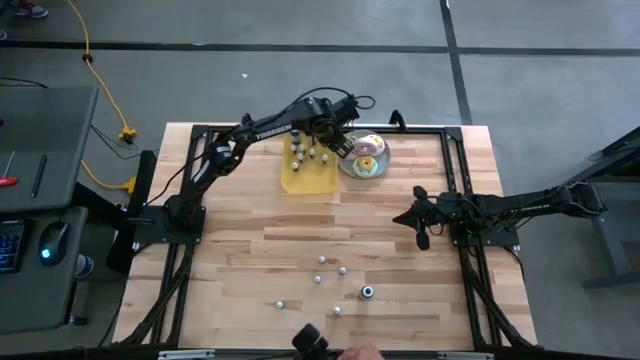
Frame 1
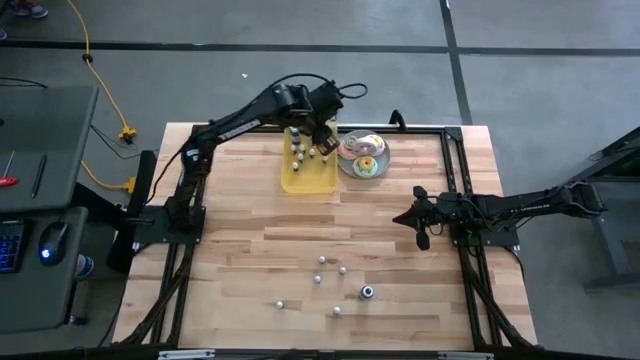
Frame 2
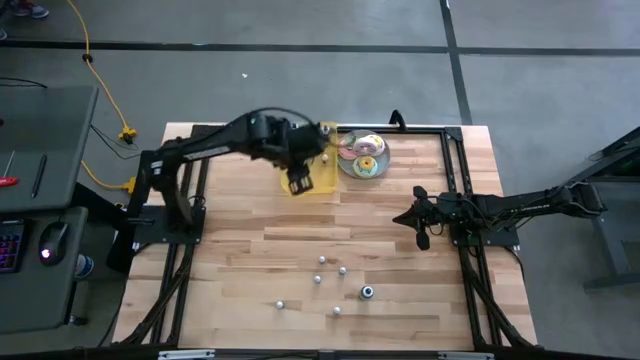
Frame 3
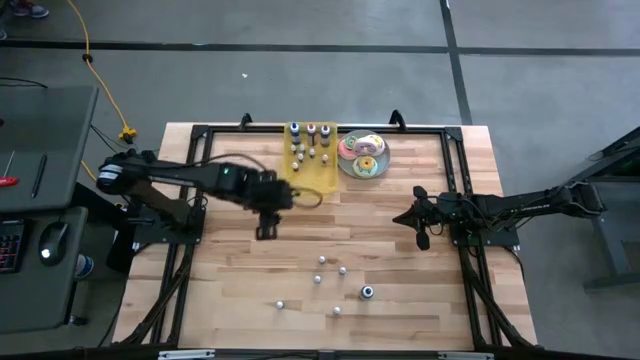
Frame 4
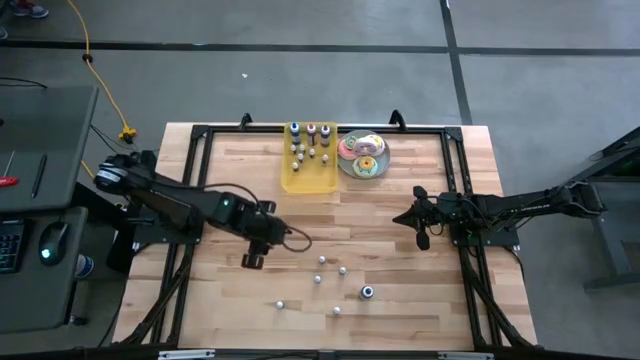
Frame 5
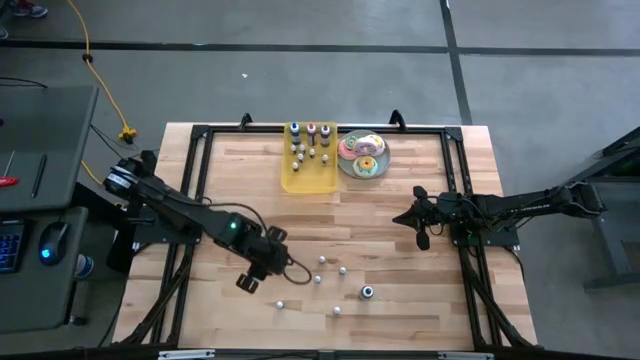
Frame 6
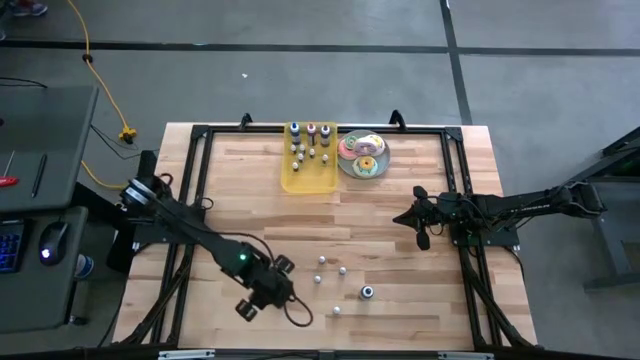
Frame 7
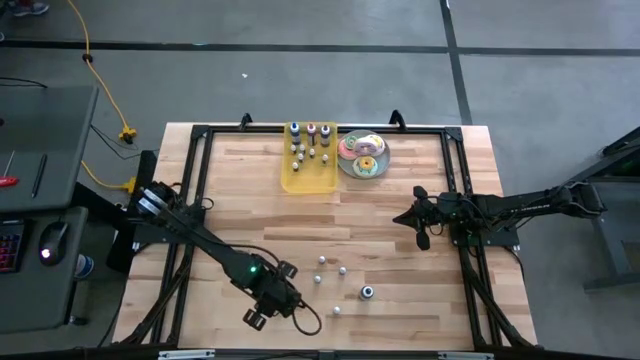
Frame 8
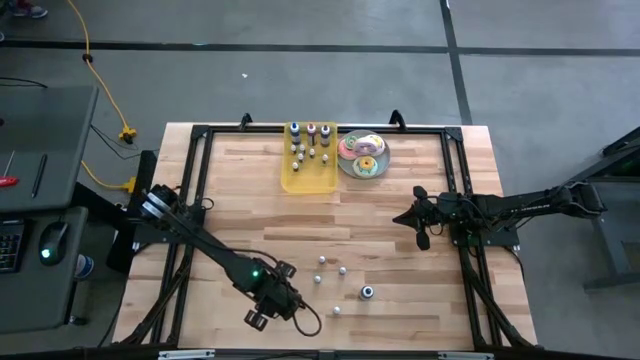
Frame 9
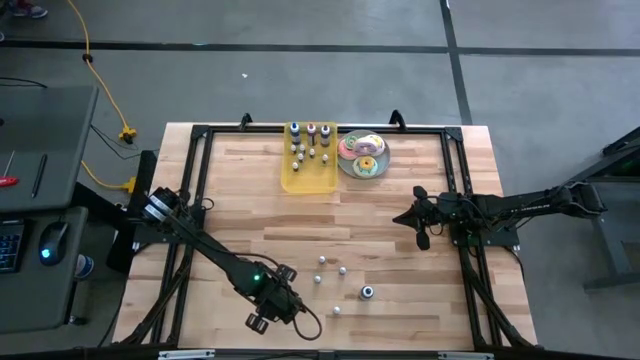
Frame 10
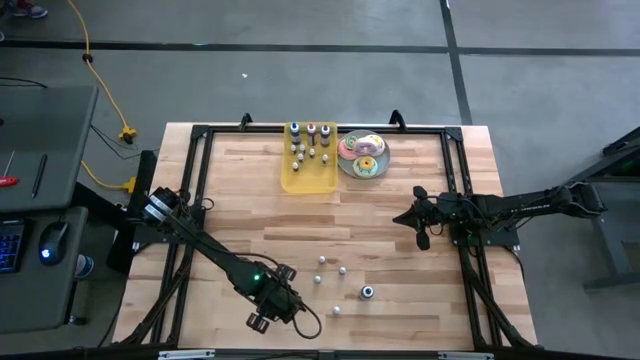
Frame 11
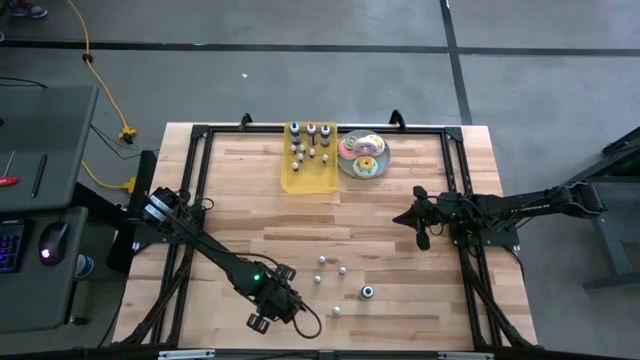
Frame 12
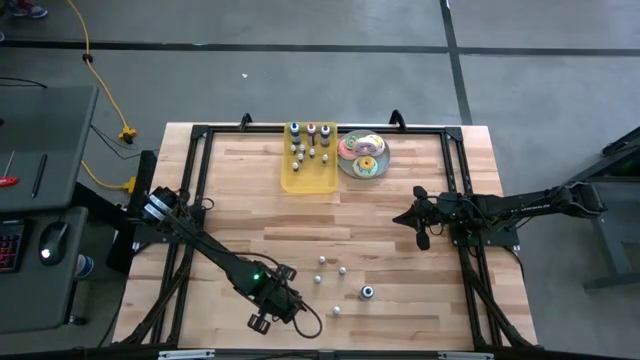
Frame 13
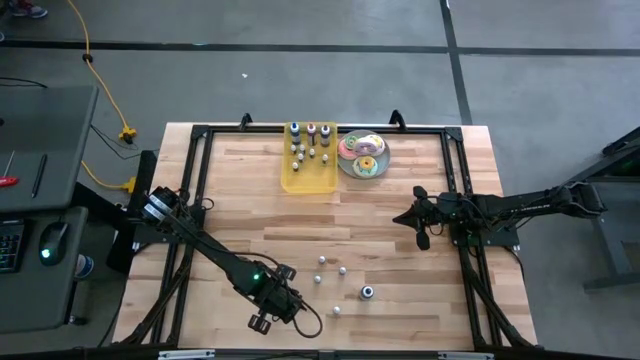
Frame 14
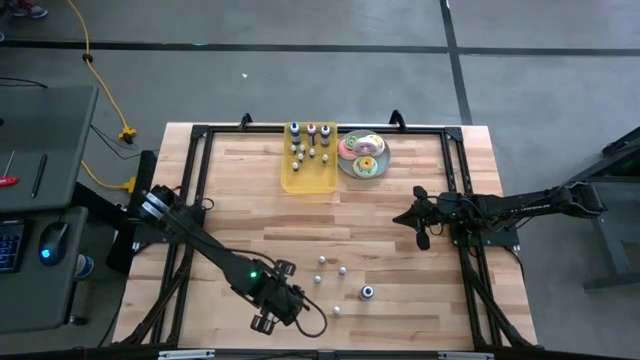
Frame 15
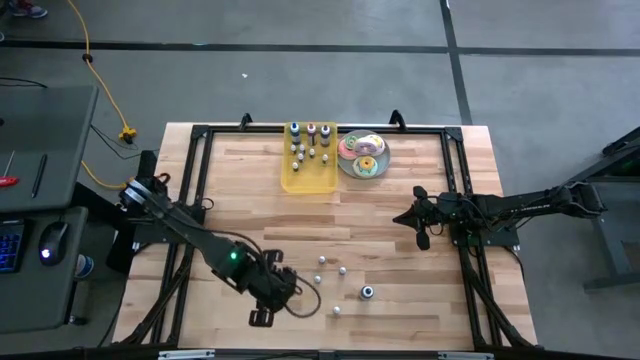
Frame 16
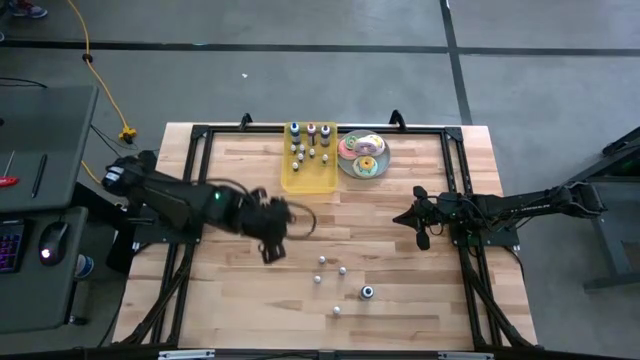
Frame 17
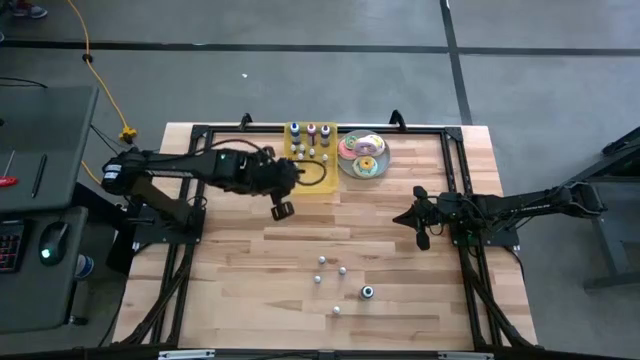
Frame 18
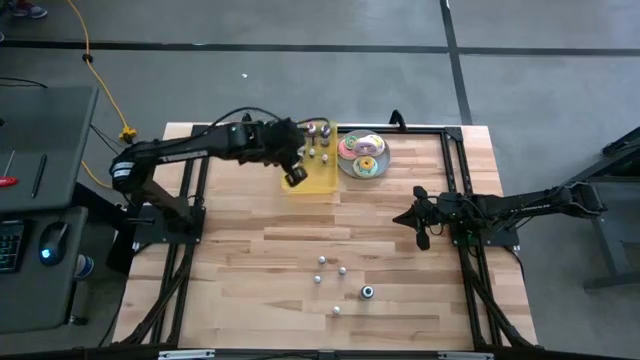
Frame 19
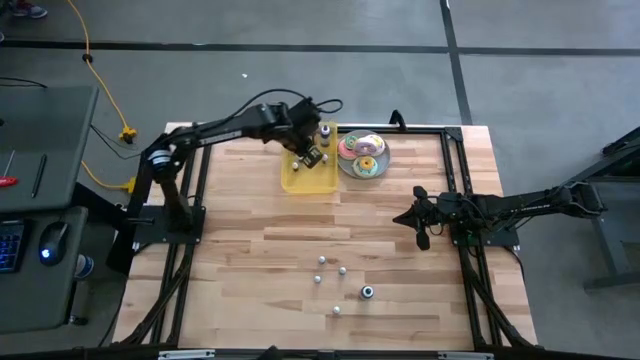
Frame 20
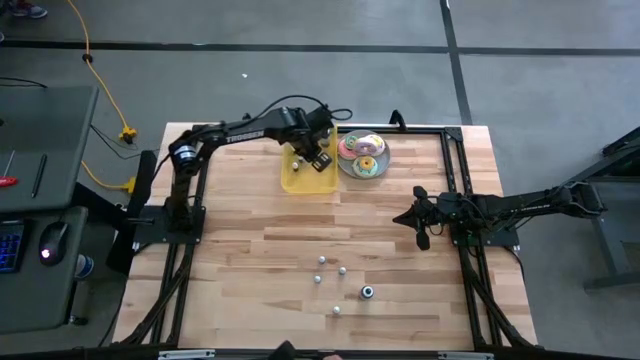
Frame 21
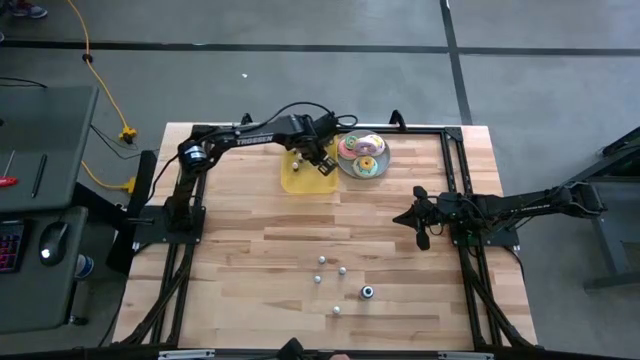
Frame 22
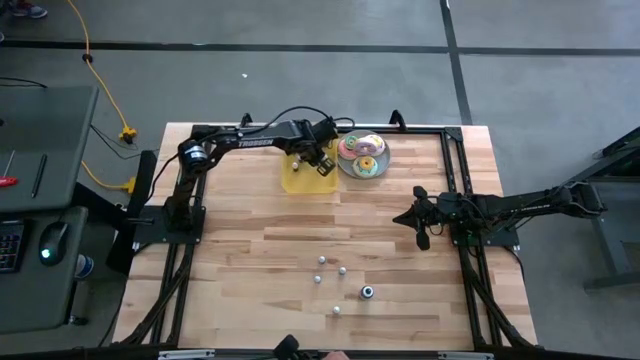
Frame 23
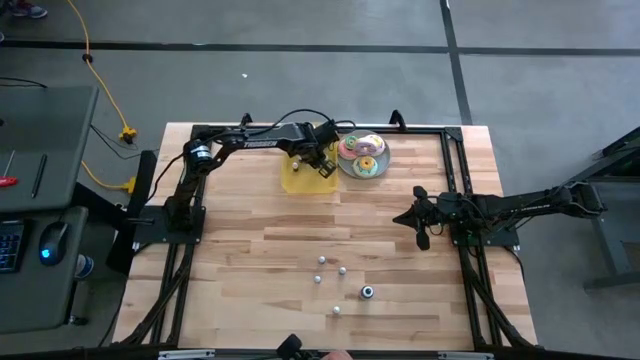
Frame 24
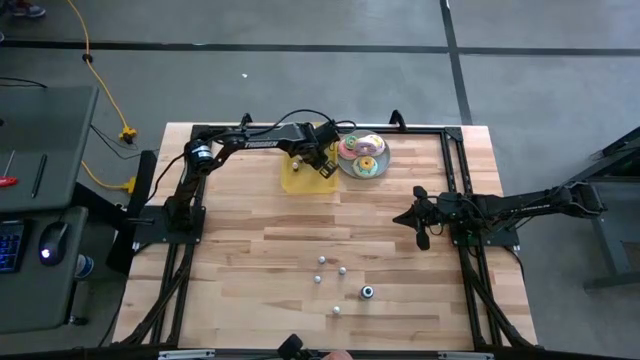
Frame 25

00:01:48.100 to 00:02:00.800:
Task: Pick & Place food coloring
Put the small black food coloring bottle into the bin

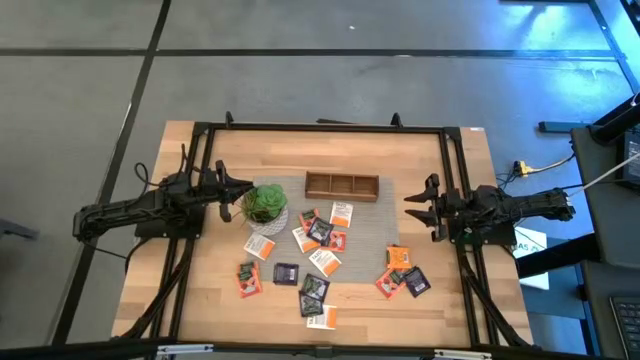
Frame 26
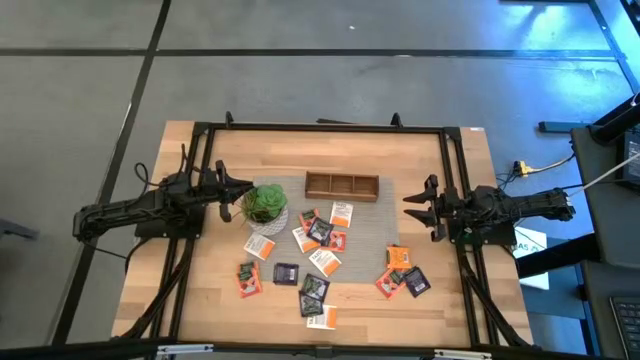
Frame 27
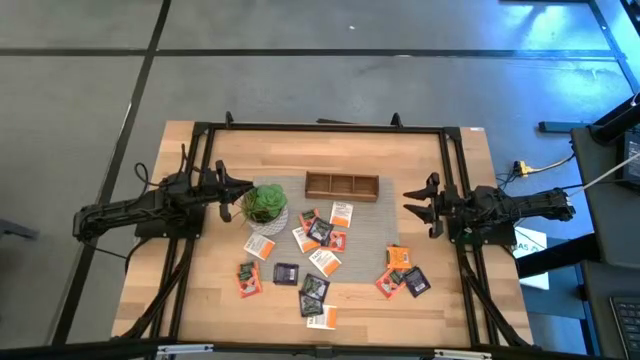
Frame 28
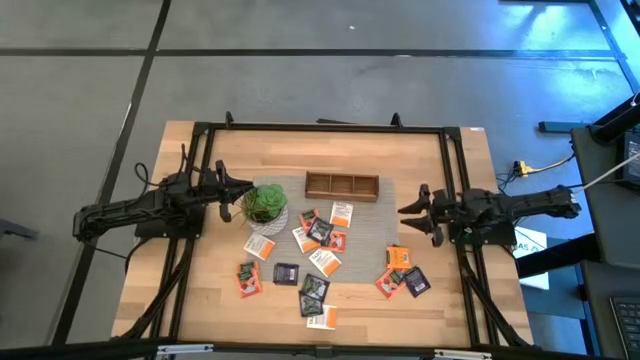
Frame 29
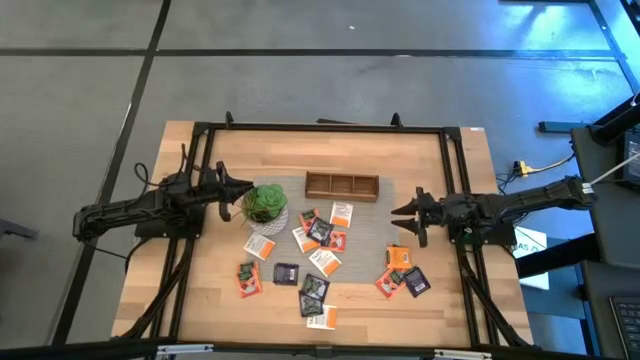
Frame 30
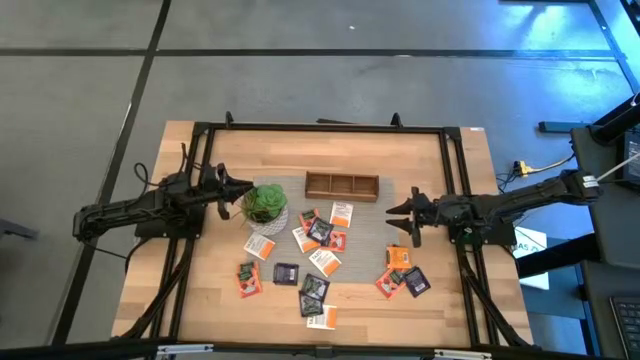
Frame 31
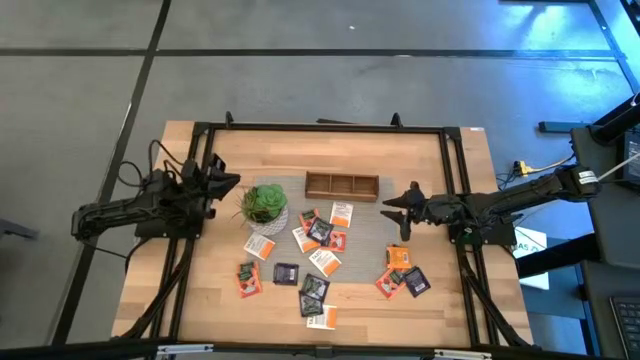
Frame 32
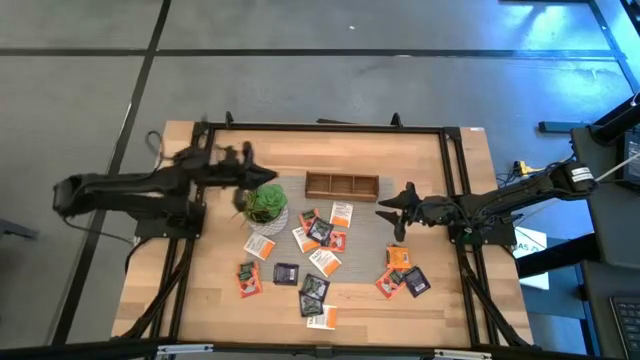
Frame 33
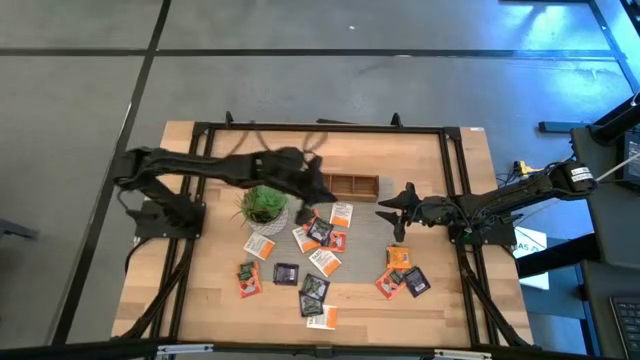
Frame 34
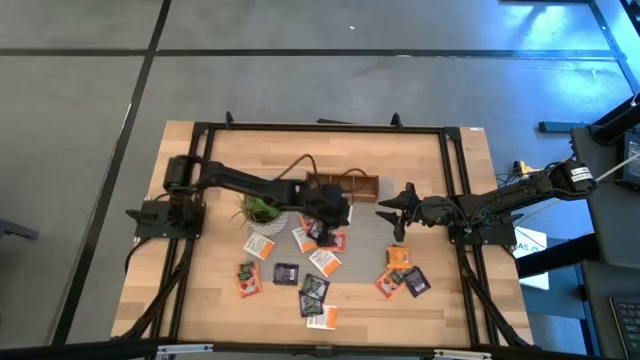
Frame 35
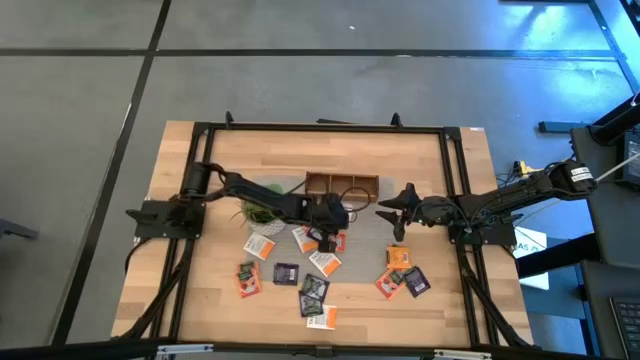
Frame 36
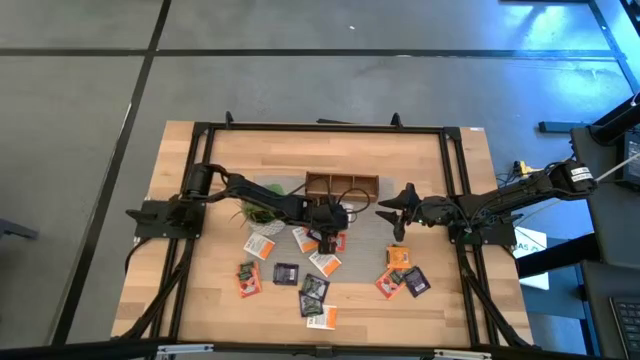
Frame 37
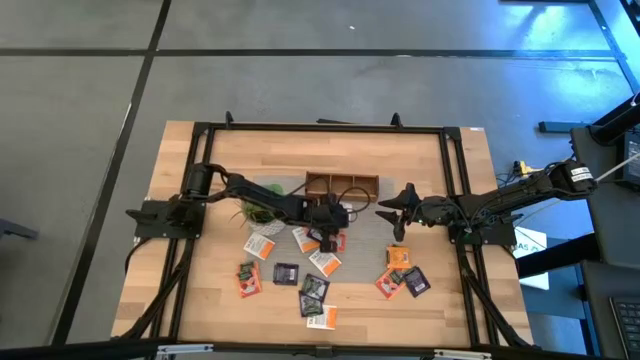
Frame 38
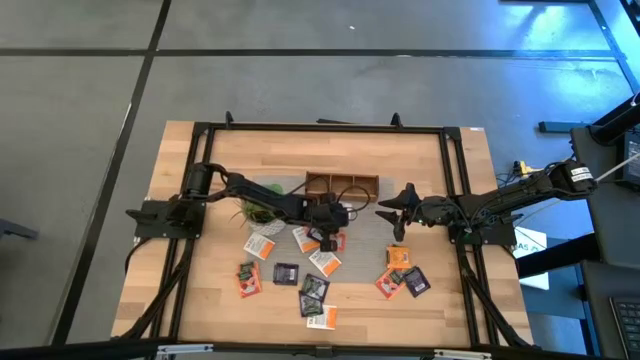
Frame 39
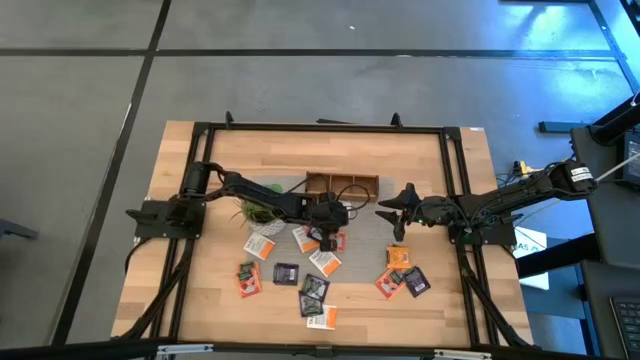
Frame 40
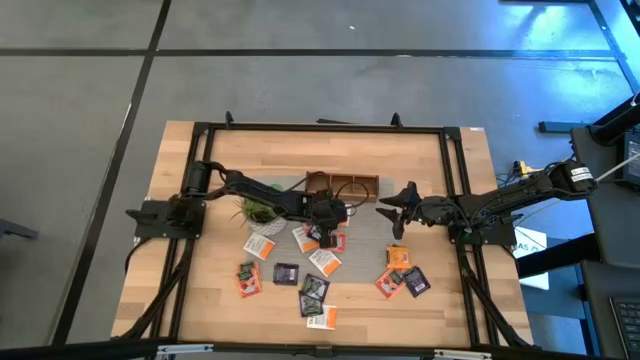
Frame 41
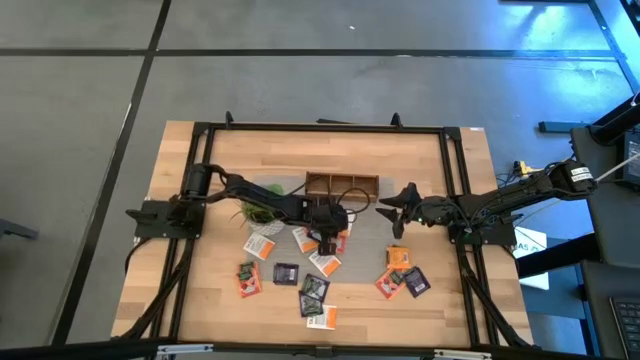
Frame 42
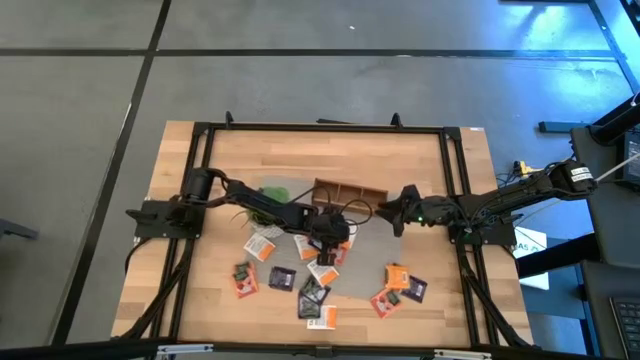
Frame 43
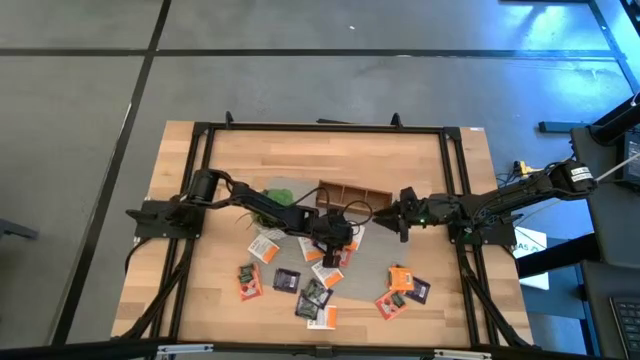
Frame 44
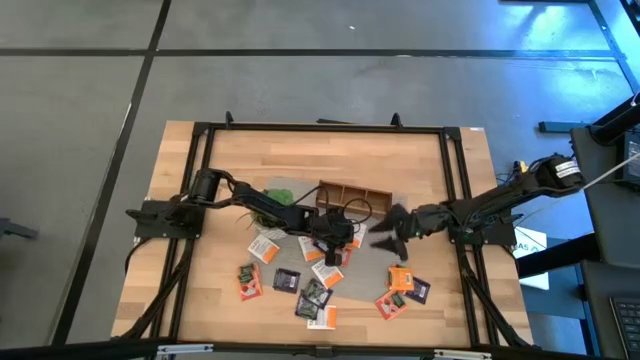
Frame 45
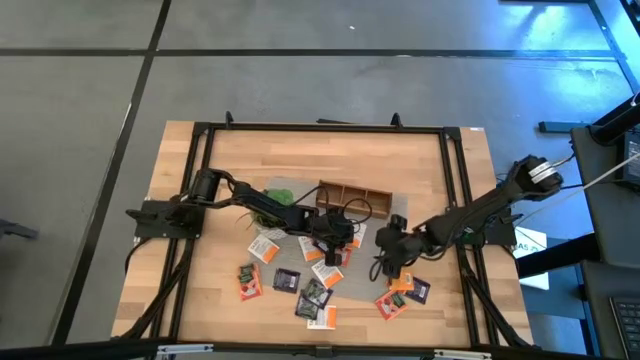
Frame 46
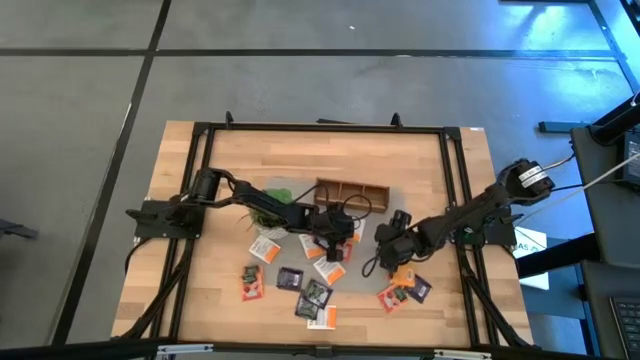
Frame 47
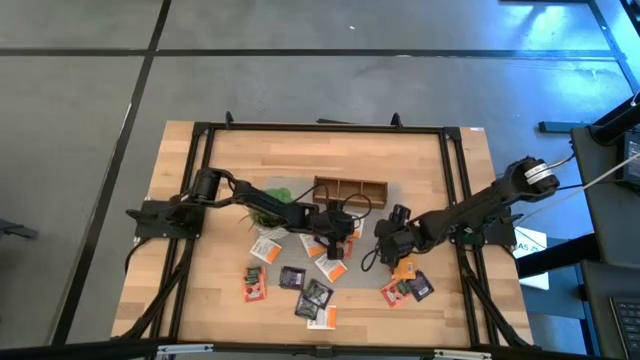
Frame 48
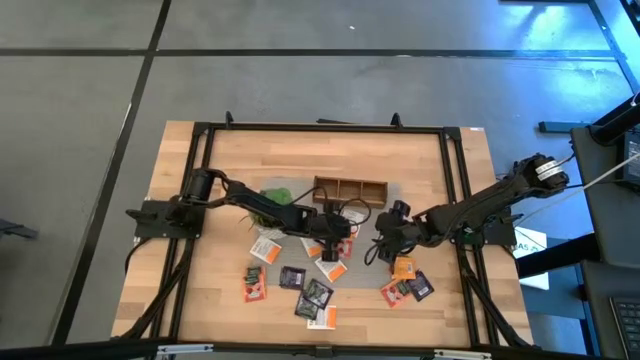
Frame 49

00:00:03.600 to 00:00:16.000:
Task: Pick & Place Tea
Put the white tea bag into the right section of the wooden organizer
